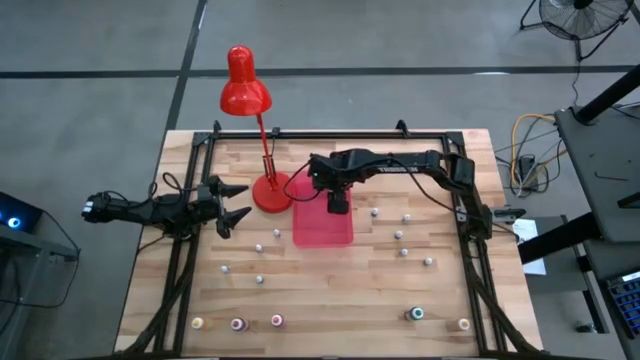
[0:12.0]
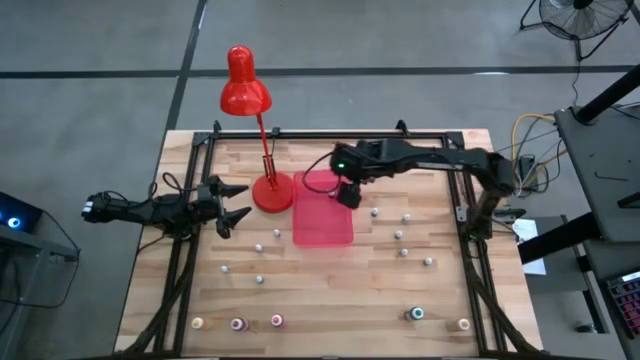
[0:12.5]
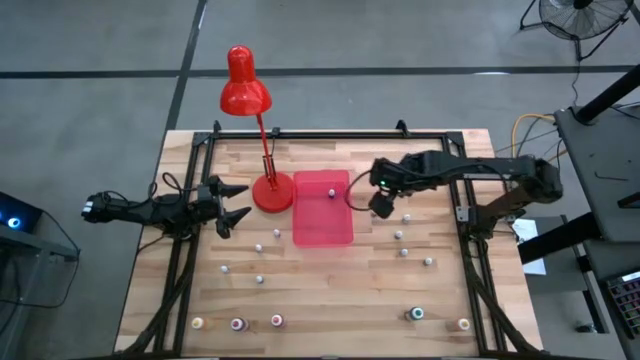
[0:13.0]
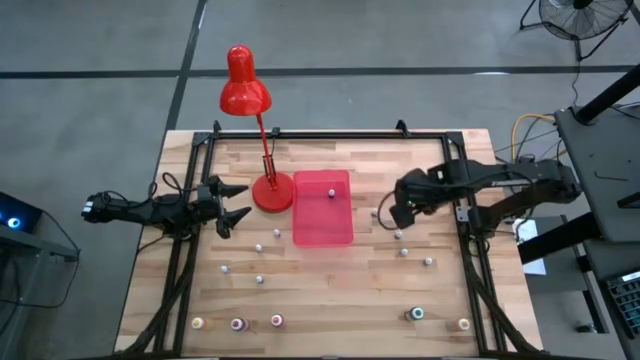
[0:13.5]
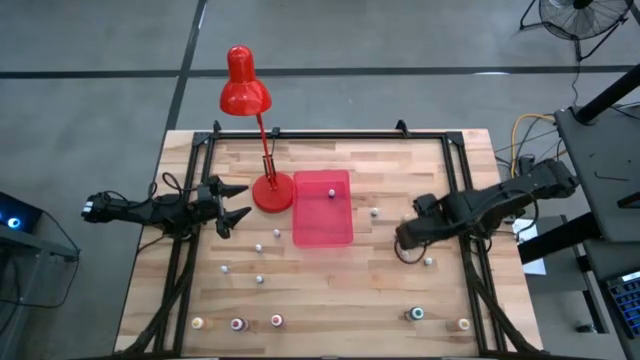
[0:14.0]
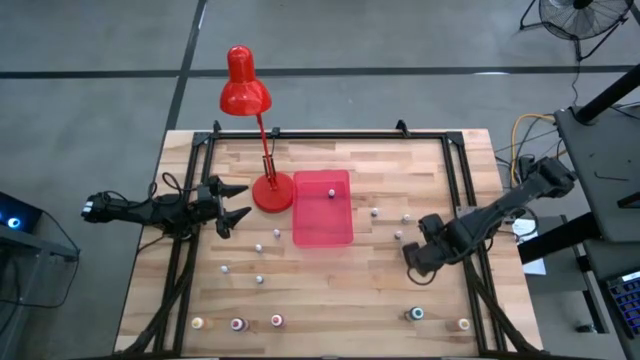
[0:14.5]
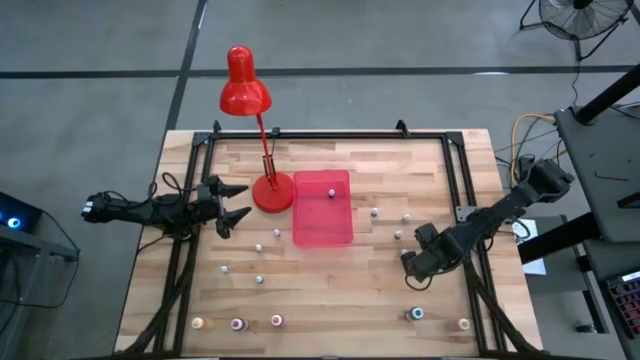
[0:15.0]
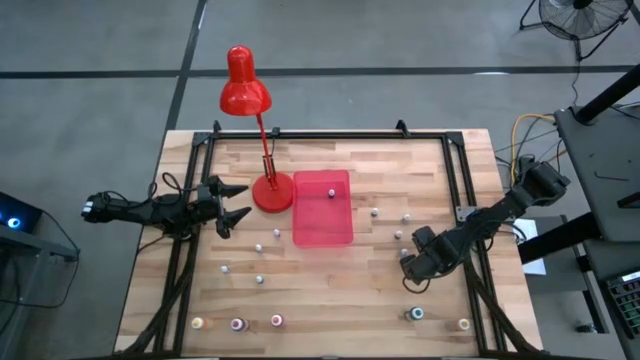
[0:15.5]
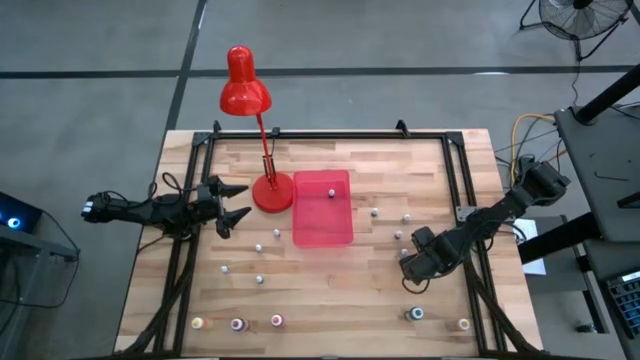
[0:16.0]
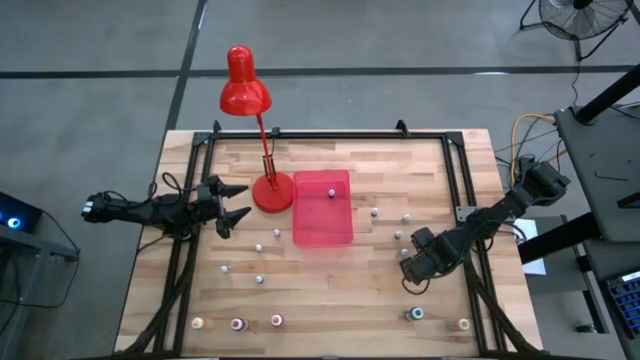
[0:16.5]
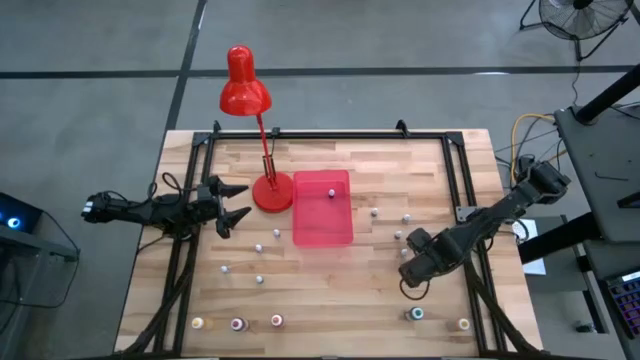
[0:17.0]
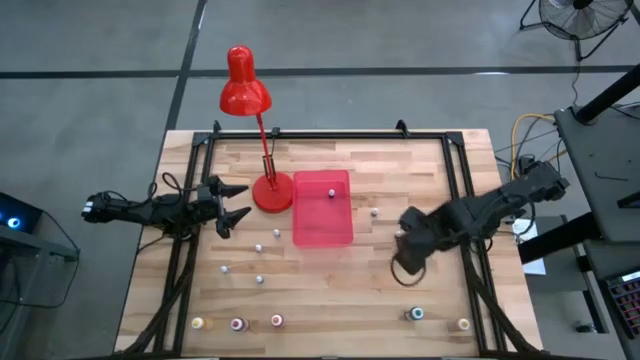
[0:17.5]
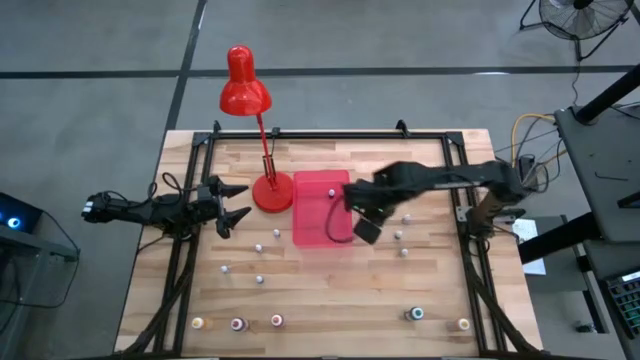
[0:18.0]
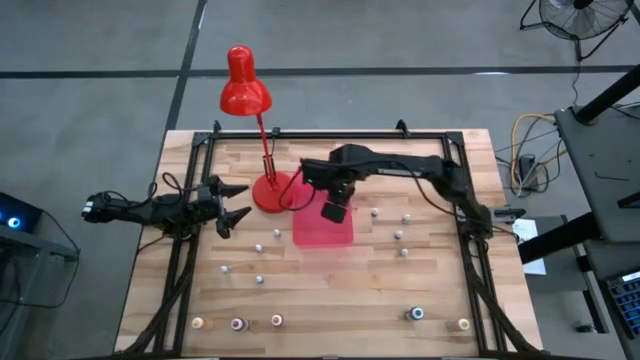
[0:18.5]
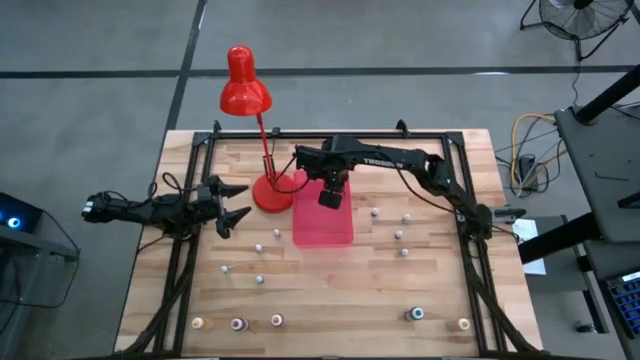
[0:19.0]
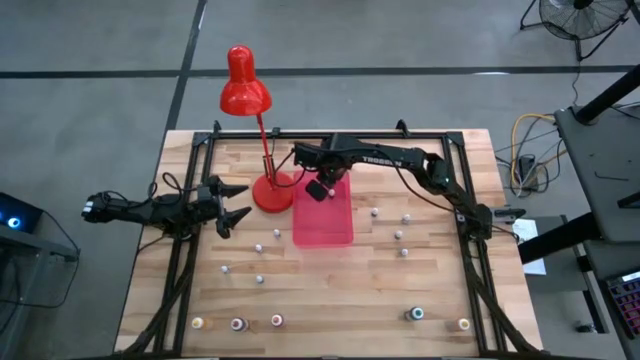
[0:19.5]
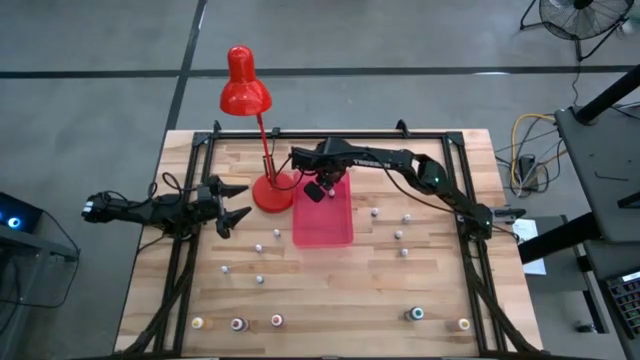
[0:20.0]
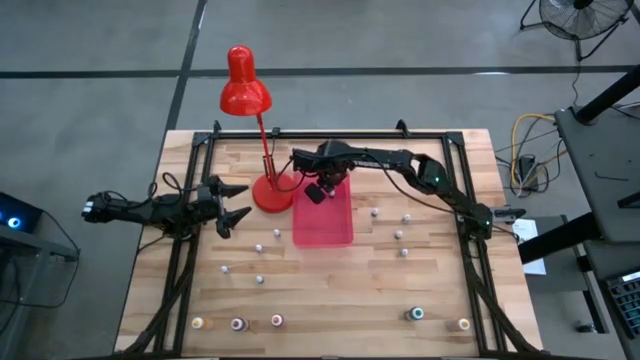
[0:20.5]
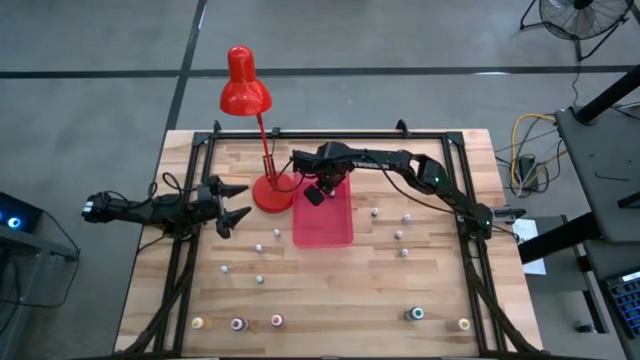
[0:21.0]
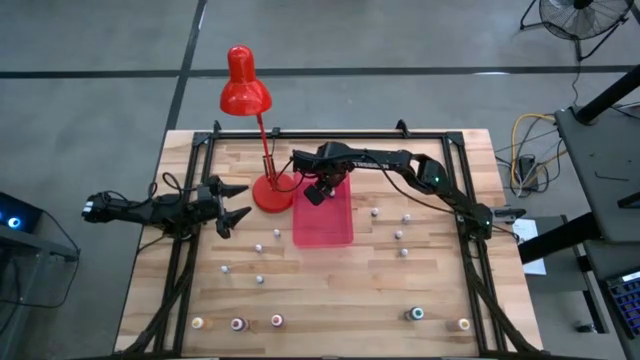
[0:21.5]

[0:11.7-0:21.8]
Task: Pick & Place food coloring
Put the small green food coloring bottle into the bin

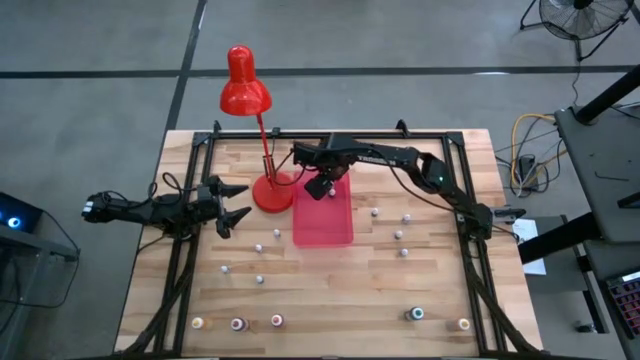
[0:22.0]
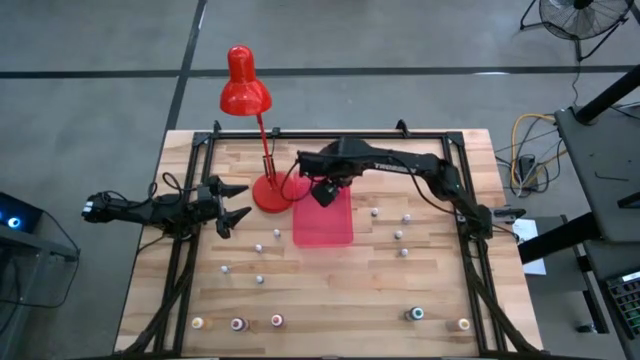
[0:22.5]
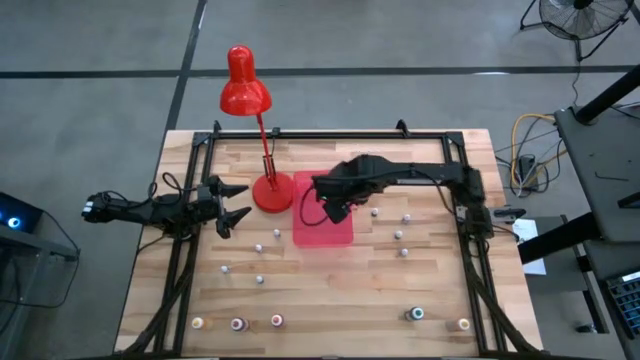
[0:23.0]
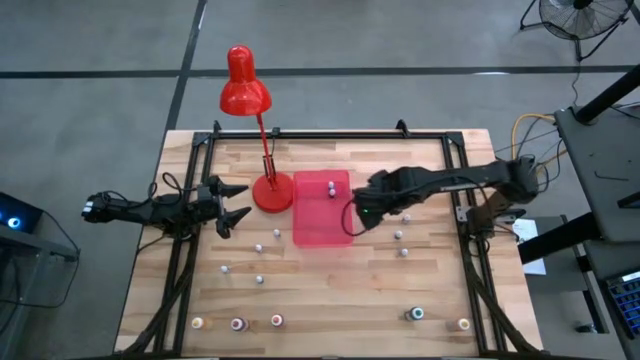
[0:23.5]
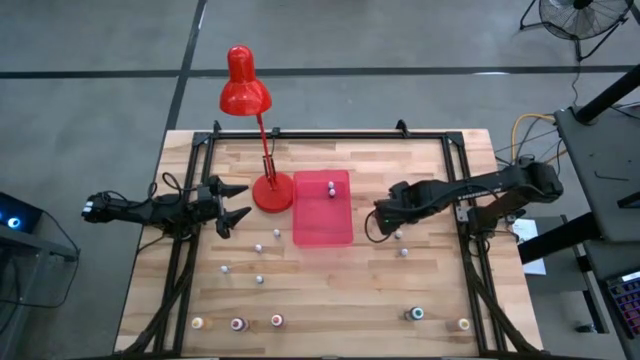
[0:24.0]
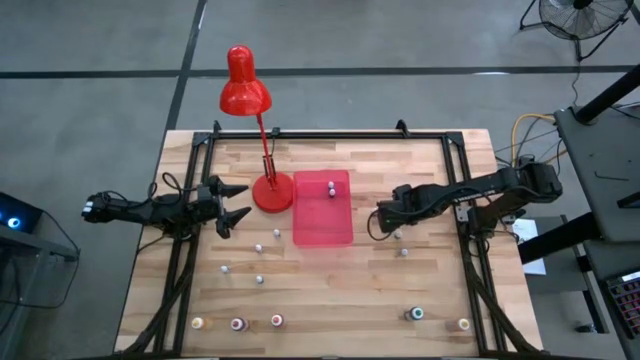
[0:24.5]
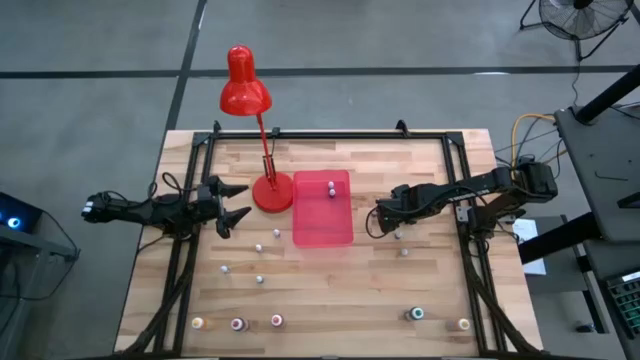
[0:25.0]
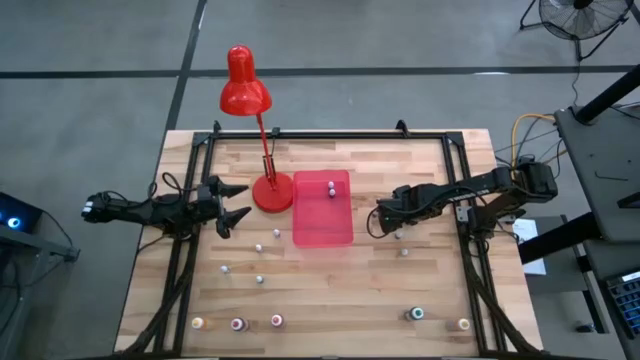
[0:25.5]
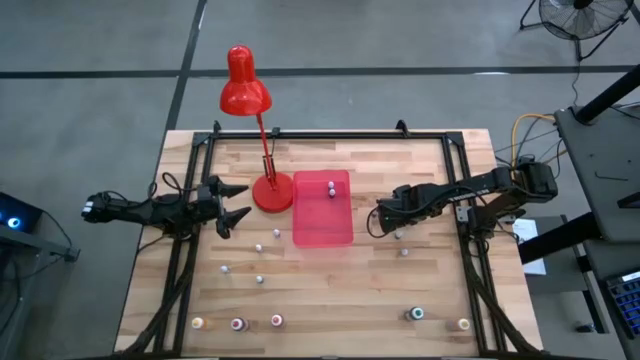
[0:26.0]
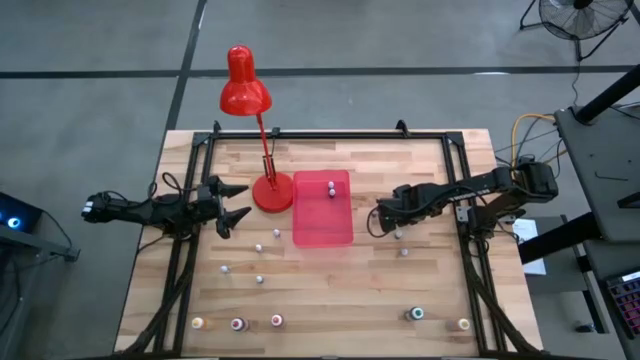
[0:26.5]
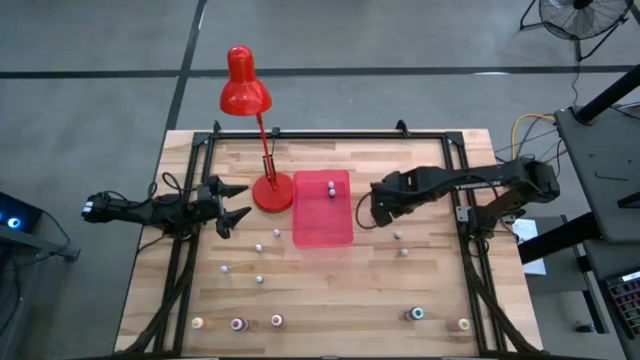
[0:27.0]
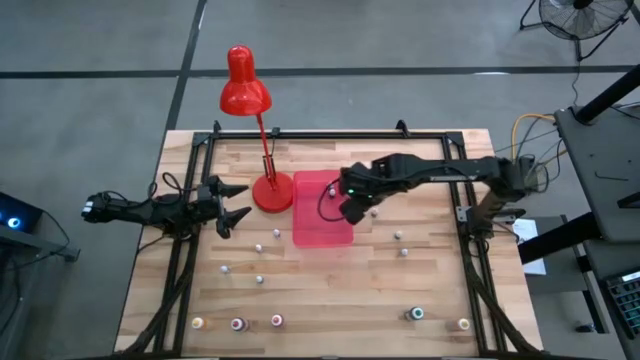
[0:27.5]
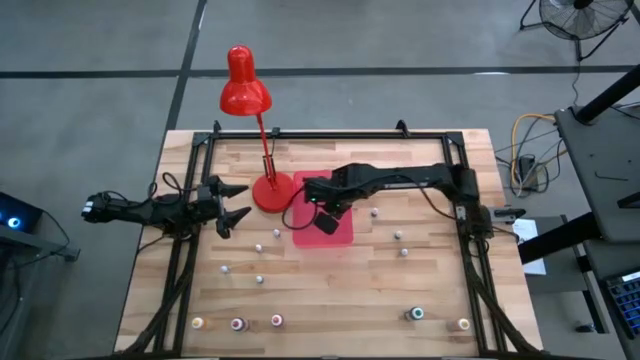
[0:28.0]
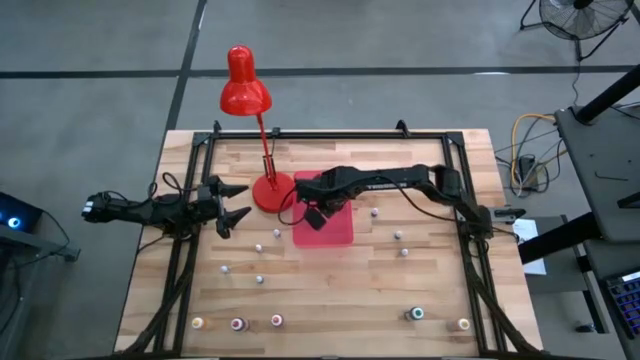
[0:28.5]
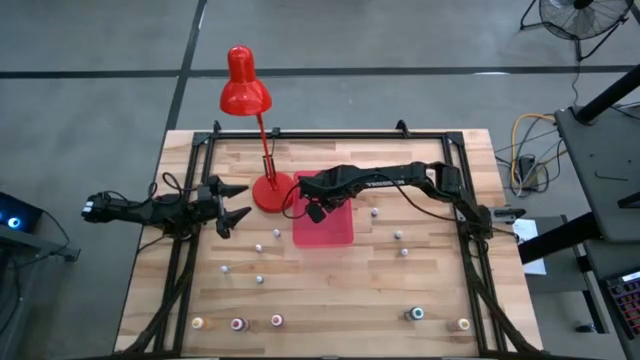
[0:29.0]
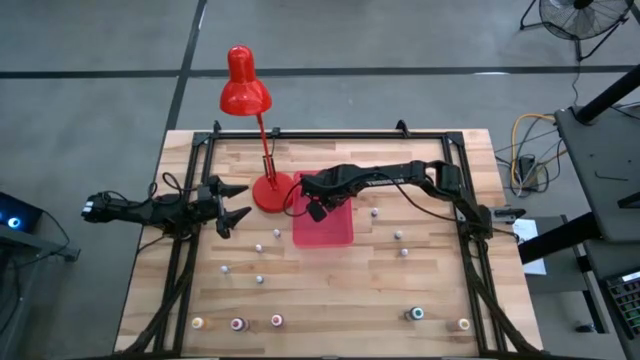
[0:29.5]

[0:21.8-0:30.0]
Put the small green food coloring bottle into the bin

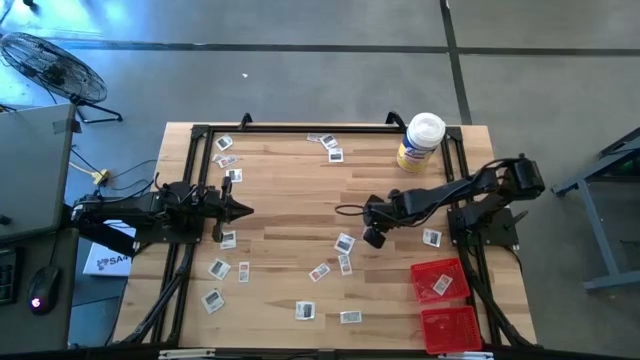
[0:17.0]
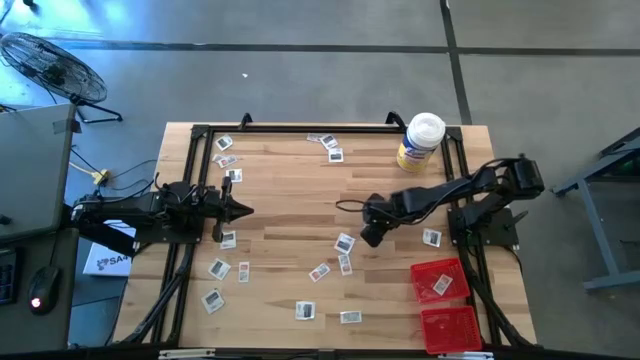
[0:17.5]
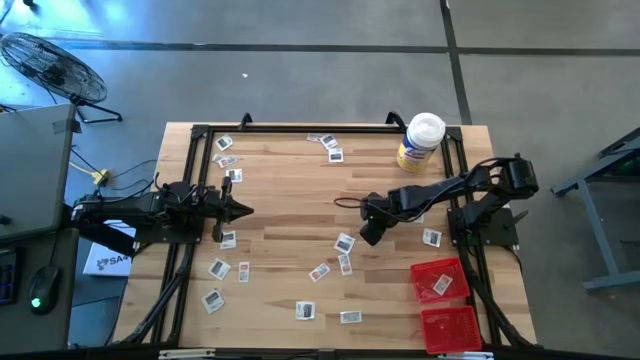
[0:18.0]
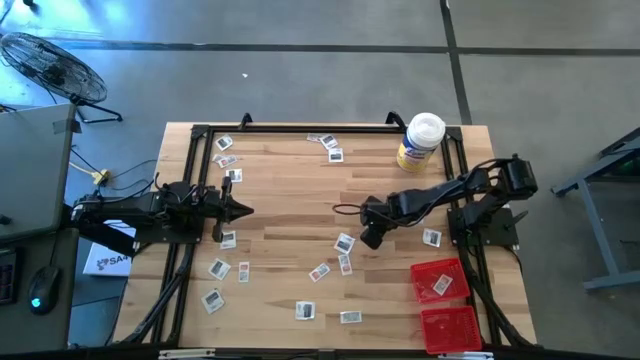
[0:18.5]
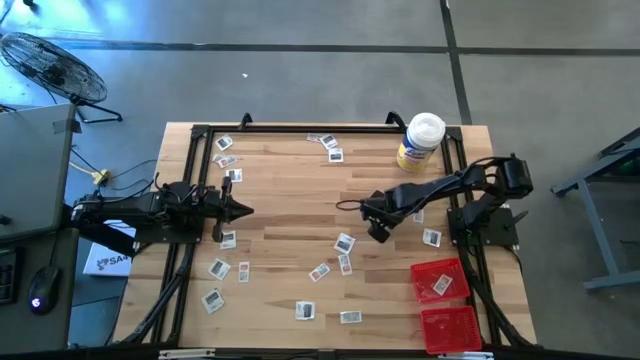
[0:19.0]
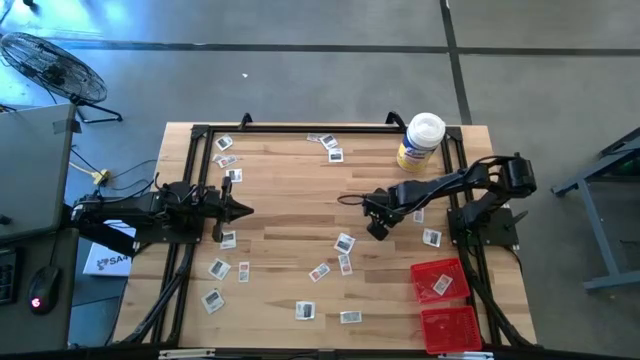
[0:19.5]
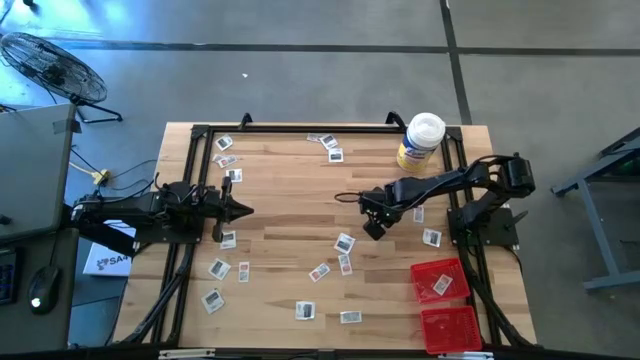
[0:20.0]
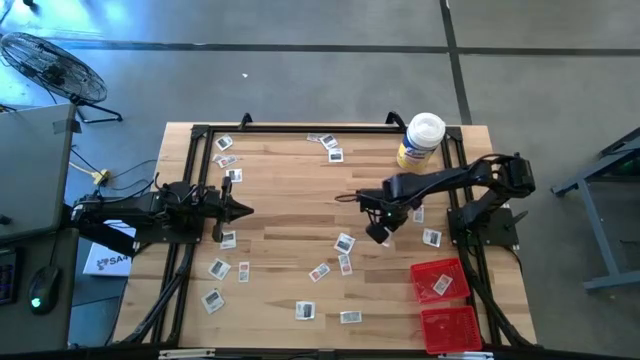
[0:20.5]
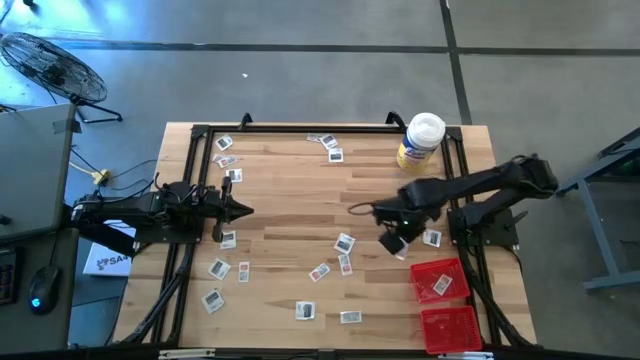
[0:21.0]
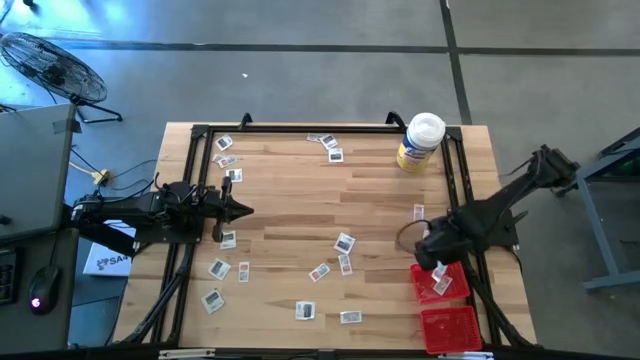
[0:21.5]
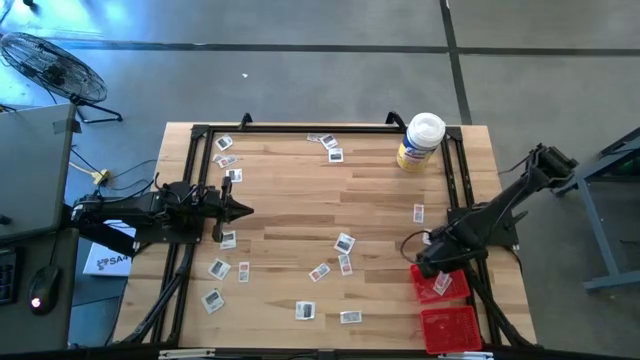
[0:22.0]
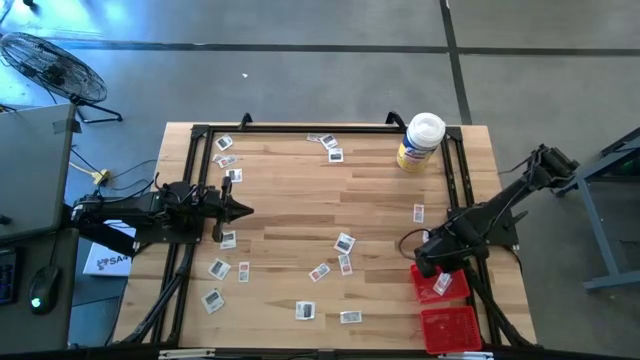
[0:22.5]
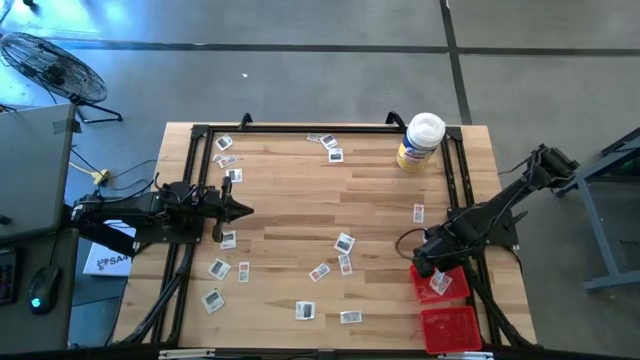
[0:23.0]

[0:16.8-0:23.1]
Task: Pick & Place First Aid Supplies
Put the white ointment pack into the top red bin
